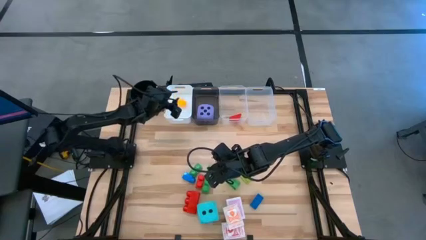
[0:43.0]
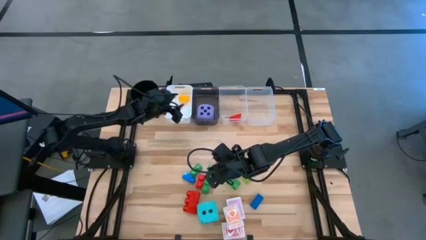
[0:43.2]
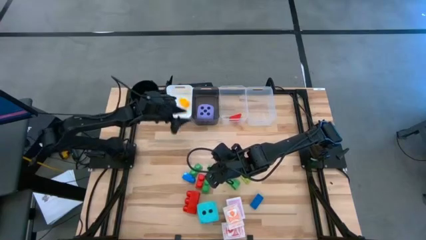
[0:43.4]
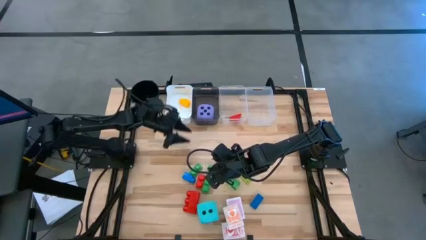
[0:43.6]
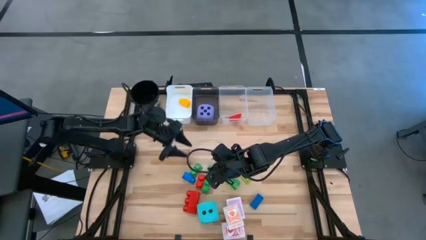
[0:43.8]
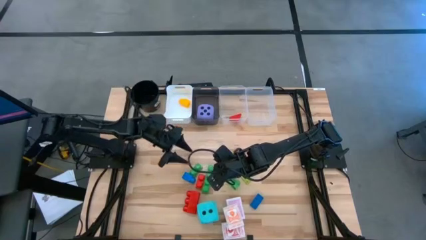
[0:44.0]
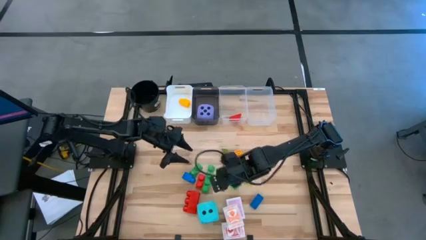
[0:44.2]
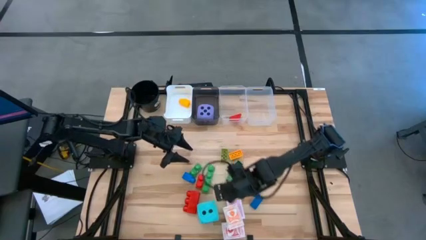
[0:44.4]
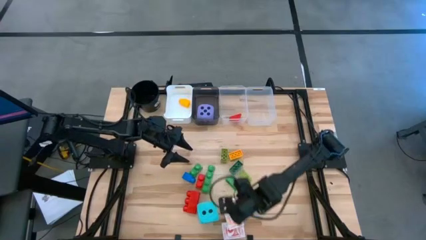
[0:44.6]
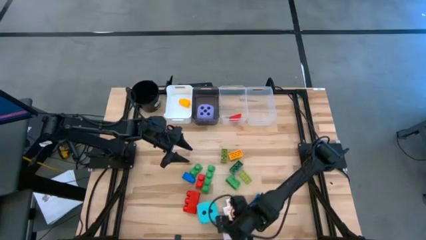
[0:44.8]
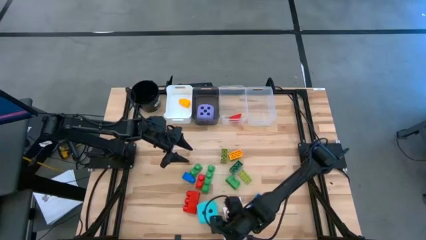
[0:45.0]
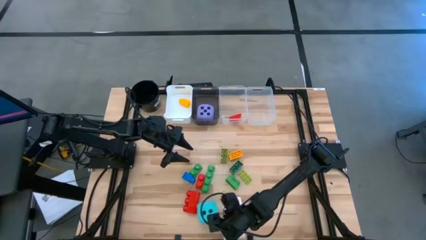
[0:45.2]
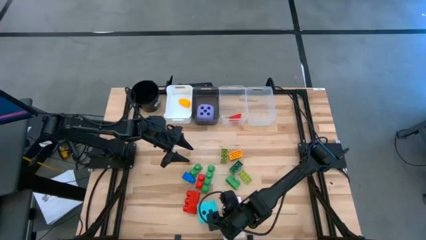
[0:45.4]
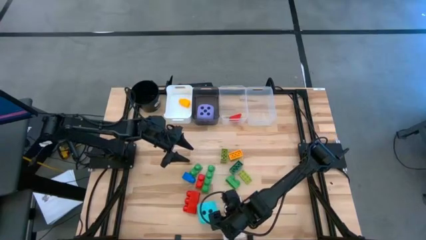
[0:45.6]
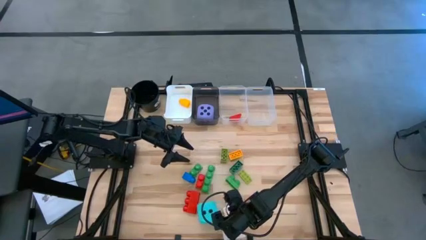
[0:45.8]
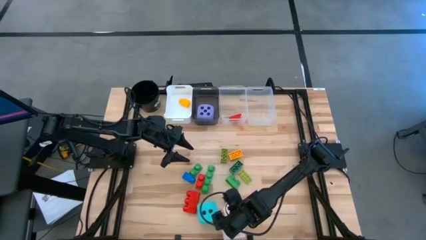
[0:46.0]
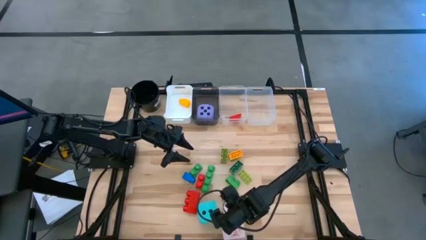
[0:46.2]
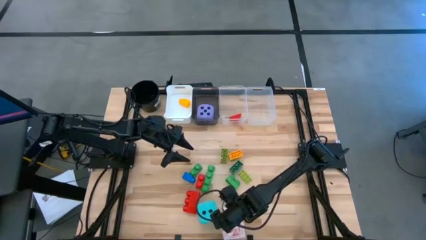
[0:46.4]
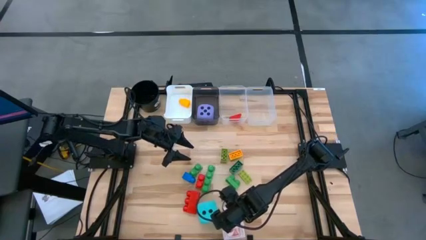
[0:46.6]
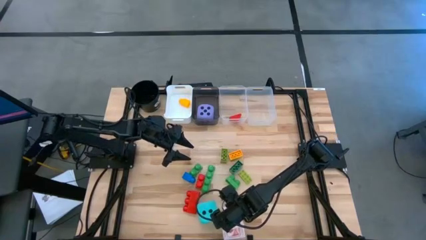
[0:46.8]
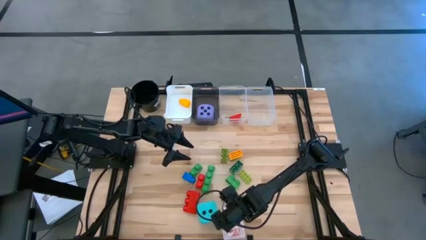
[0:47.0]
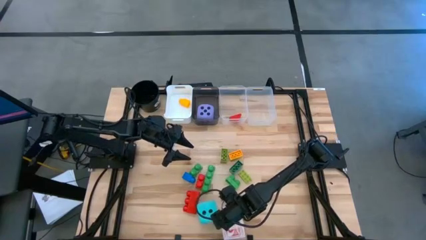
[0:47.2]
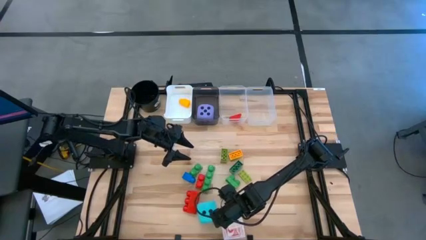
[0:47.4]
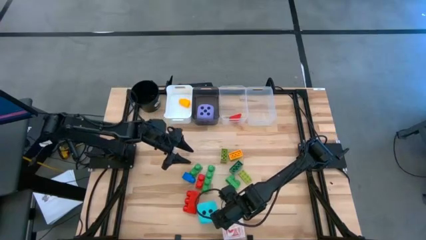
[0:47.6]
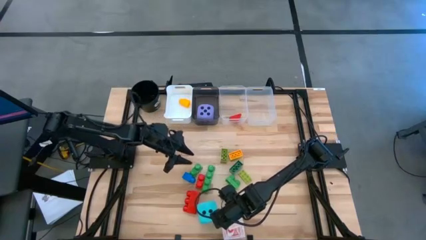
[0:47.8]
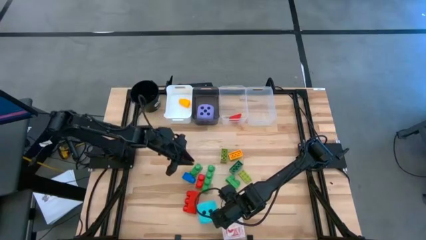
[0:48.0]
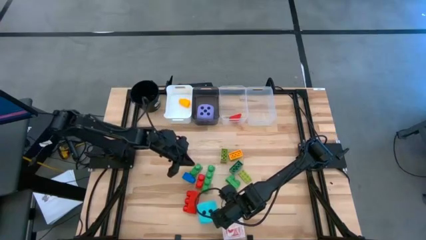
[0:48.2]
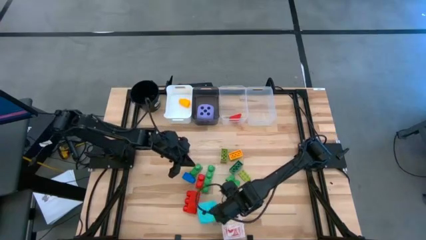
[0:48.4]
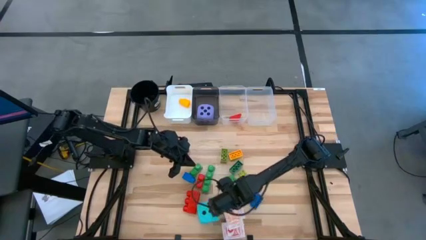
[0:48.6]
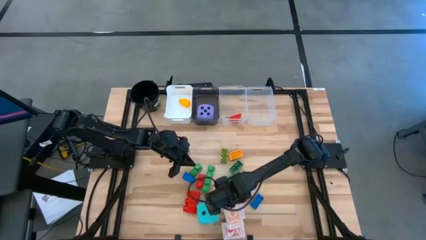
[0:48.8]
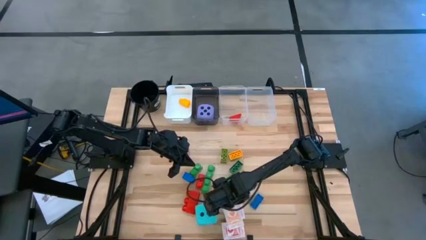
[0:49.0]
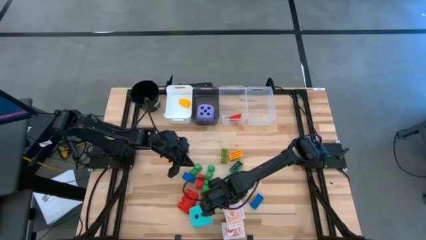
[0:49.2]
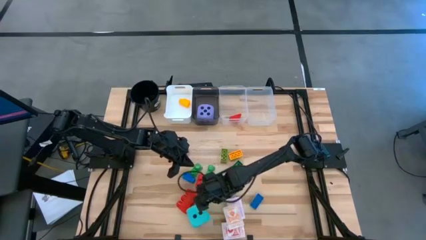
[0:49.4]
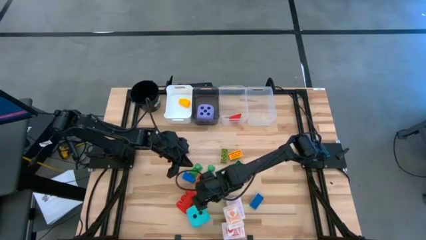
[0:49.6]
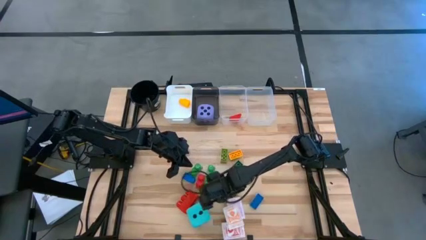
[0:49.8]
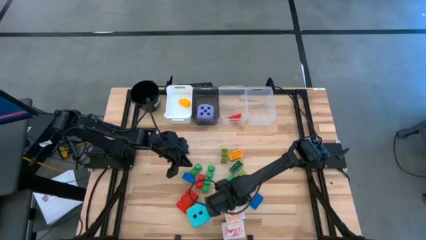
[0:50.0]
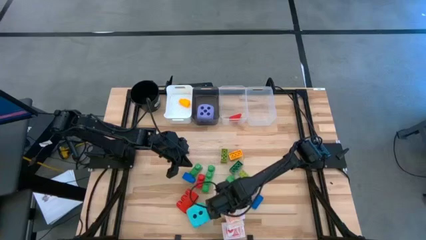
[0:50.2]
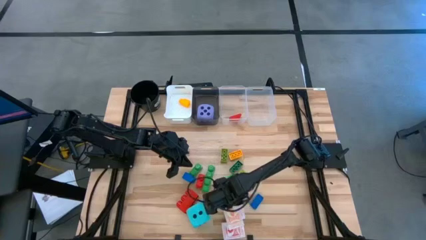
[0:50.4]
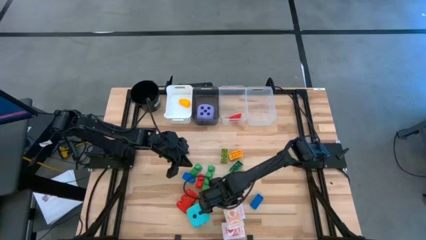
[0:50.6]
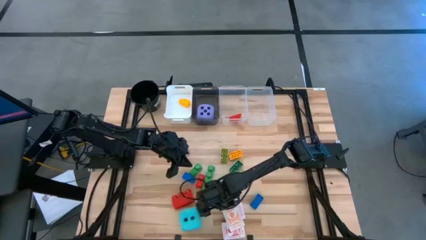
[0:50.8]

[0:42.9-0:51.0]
Task: Pick & Place Toys
Move the blue dice

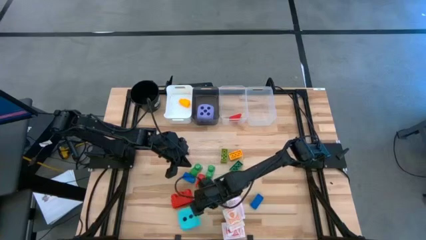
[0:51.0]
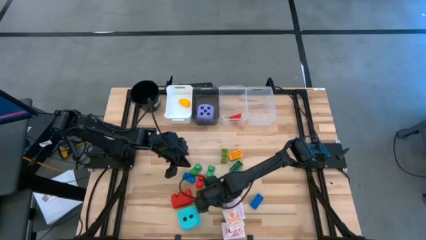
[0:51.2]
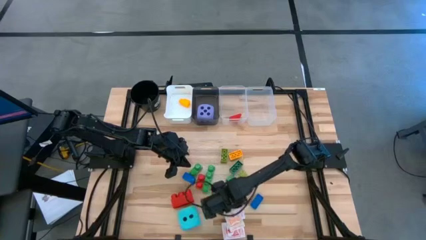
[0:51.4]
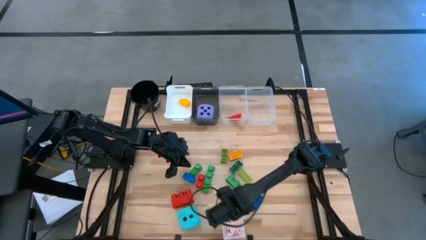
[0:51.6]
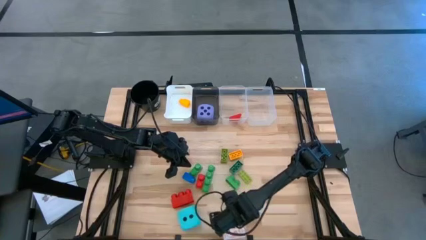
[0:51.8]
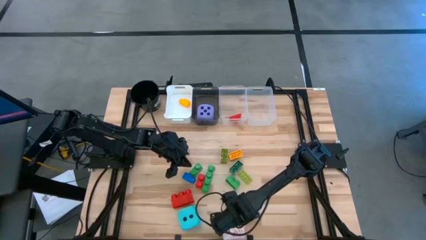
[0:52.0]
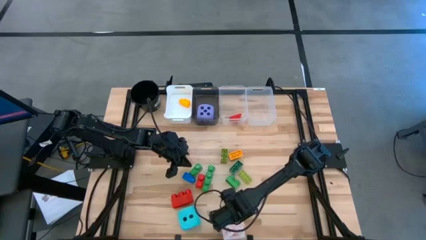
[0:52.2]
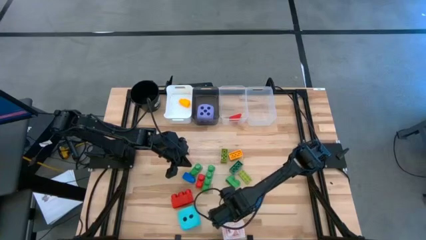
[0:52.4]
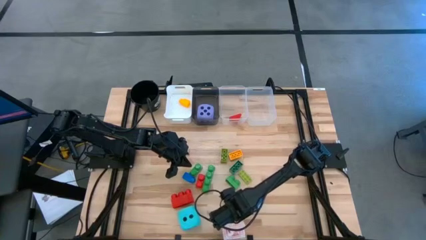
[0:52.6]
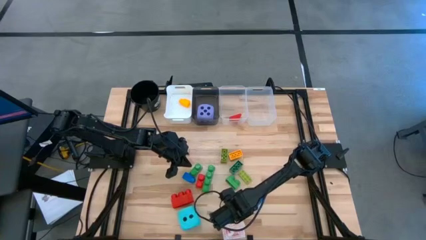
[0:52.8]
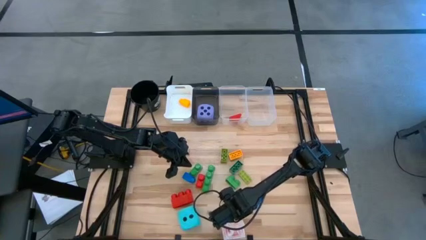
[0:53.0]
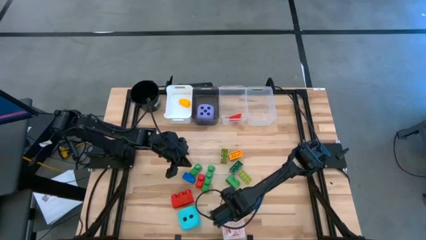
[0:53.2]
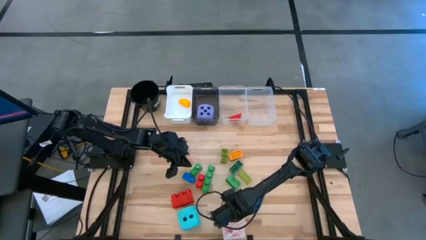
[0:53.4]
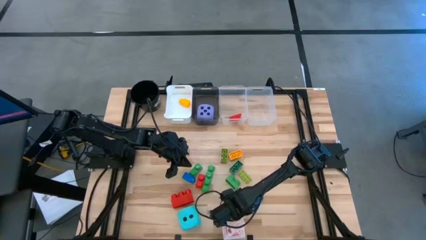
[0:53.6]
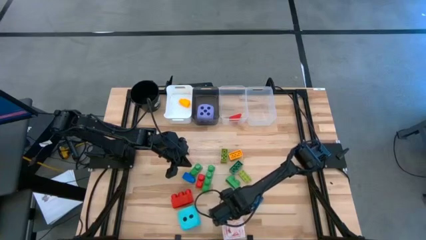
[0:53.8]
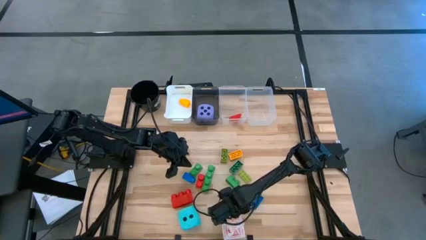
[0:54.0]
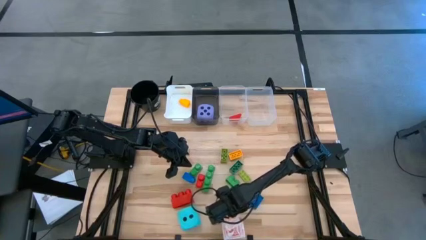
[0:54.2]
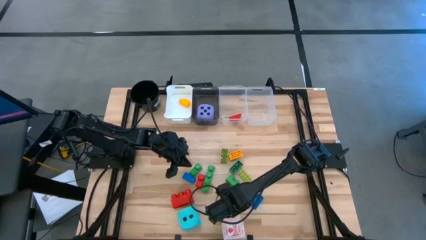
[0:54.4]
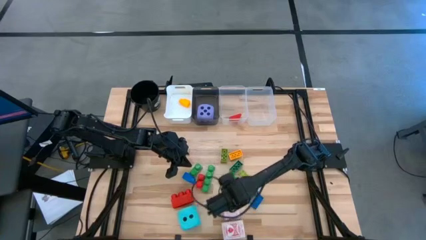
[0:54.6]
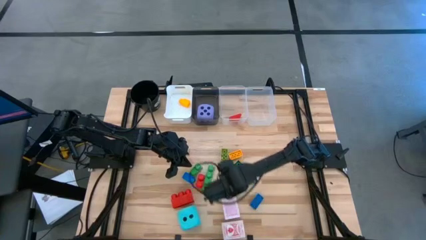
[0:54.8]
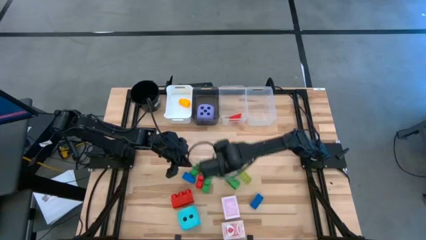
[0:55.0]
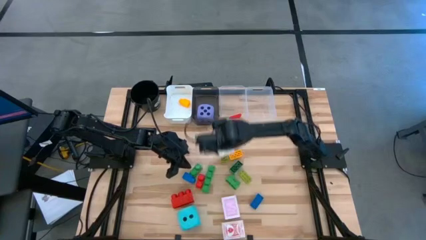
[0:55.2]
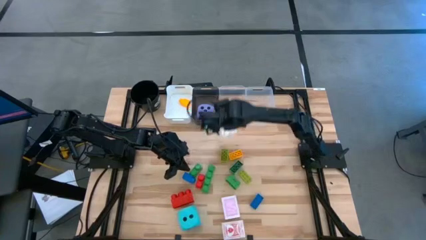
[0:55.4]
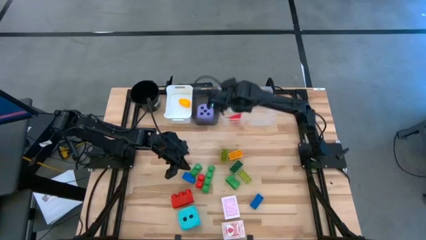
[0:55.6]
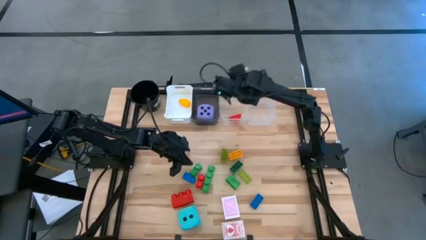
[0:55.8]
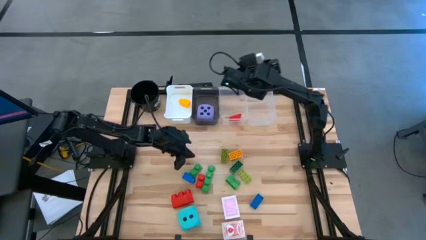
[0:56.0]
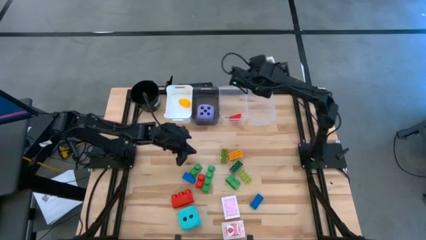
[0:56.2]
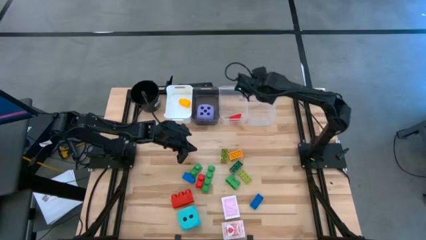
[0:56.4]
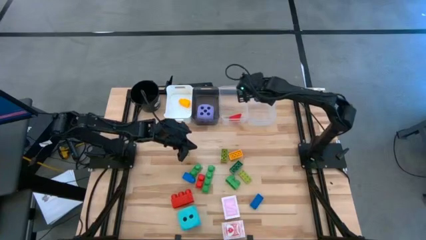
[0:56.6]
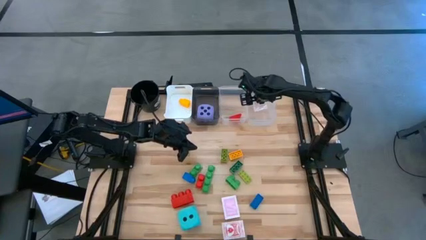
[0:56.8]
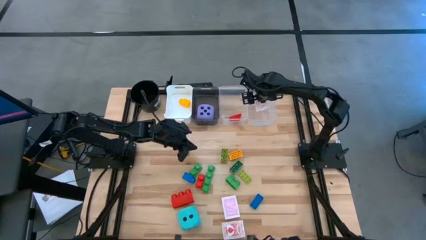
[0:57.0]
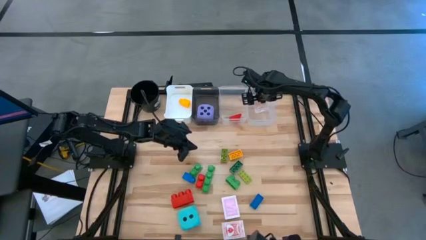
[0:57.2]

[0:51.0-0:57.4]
Put the orange deck of cards into the right transparent bin
